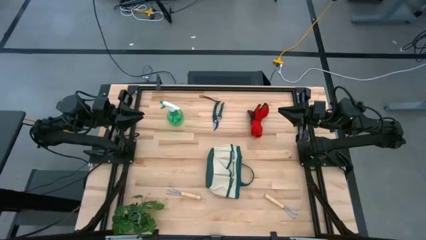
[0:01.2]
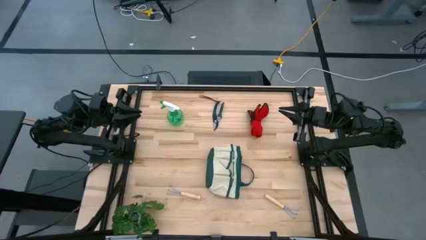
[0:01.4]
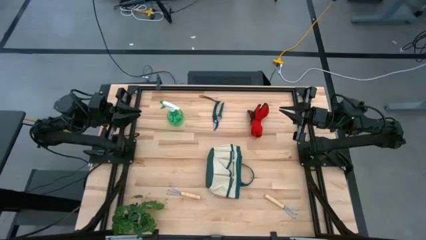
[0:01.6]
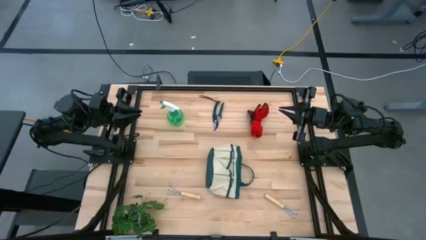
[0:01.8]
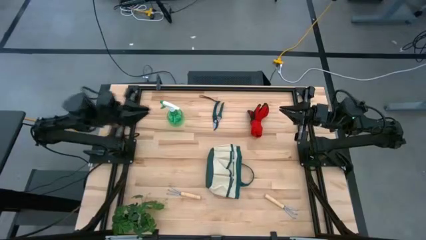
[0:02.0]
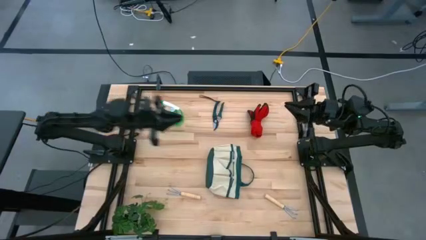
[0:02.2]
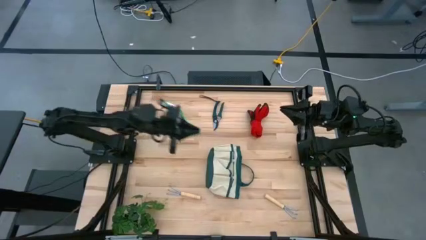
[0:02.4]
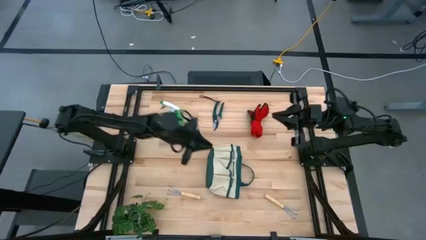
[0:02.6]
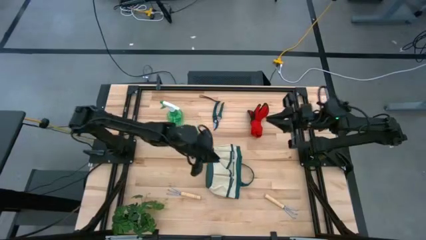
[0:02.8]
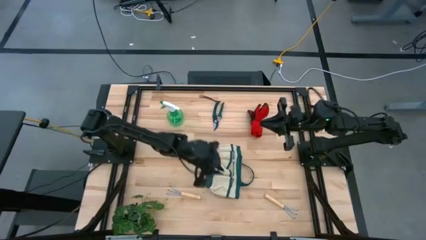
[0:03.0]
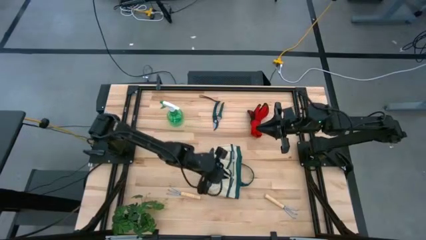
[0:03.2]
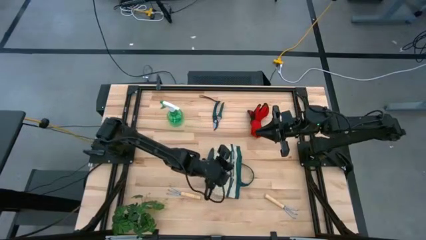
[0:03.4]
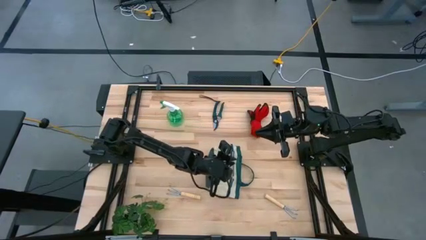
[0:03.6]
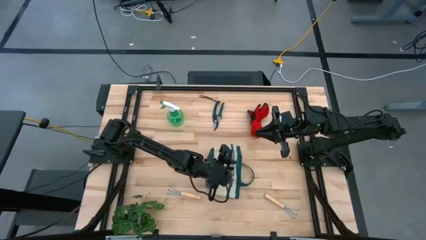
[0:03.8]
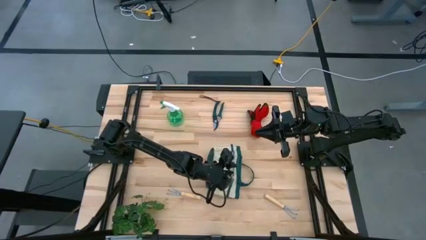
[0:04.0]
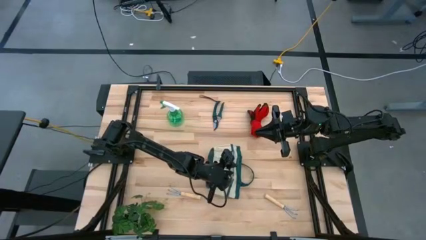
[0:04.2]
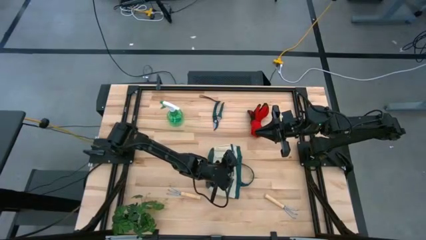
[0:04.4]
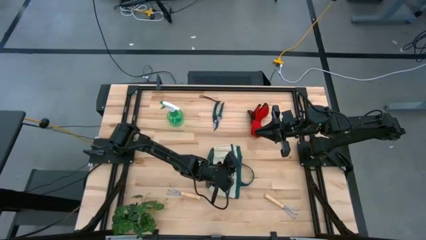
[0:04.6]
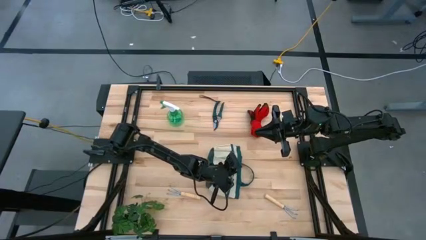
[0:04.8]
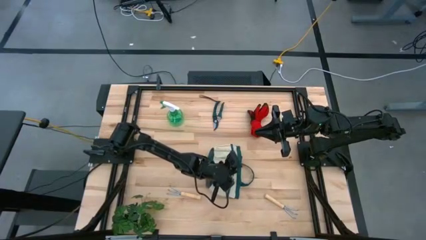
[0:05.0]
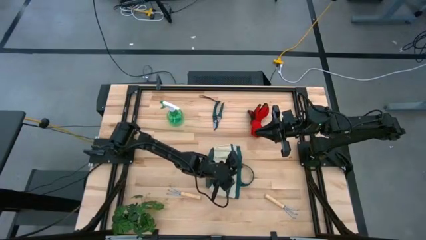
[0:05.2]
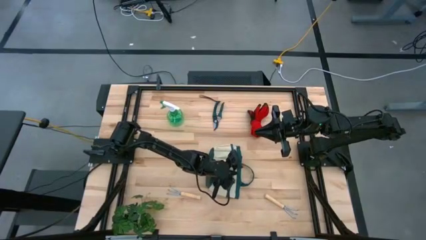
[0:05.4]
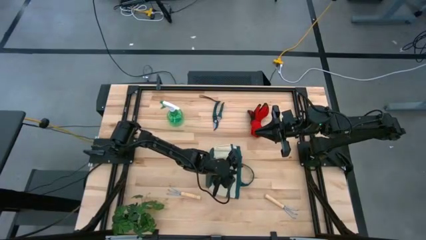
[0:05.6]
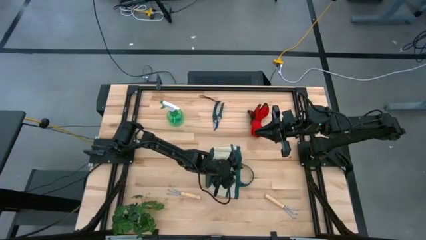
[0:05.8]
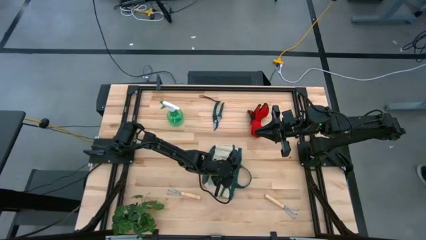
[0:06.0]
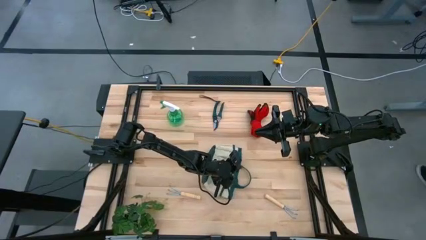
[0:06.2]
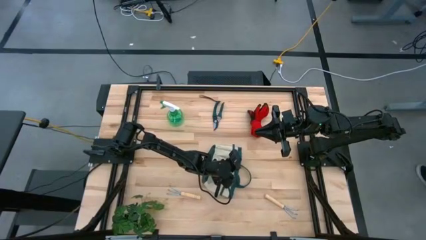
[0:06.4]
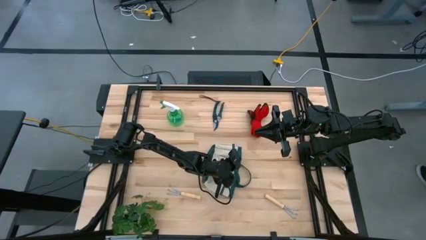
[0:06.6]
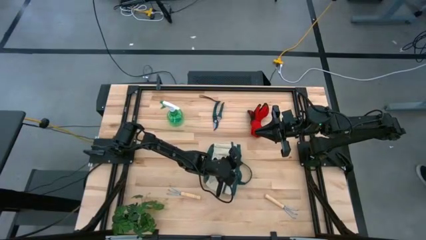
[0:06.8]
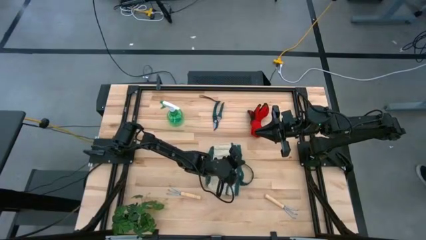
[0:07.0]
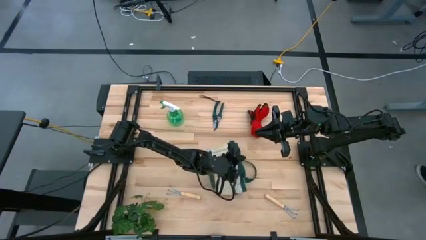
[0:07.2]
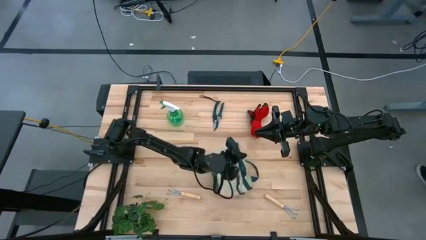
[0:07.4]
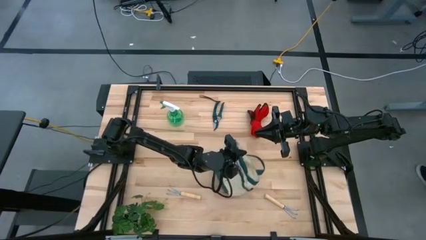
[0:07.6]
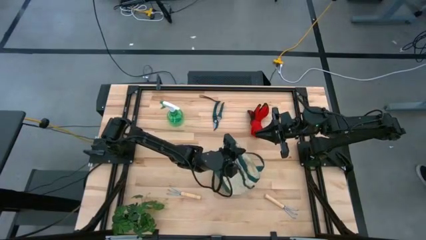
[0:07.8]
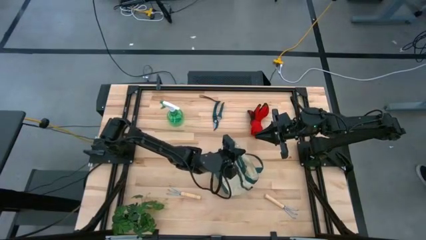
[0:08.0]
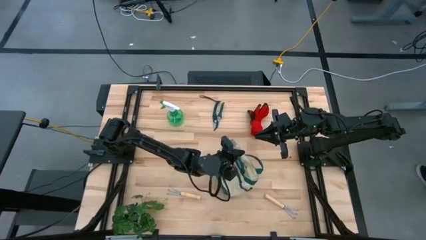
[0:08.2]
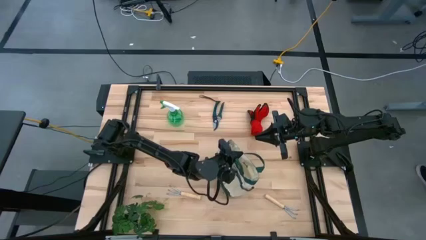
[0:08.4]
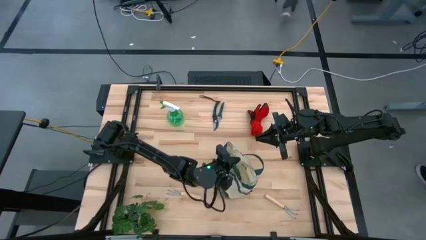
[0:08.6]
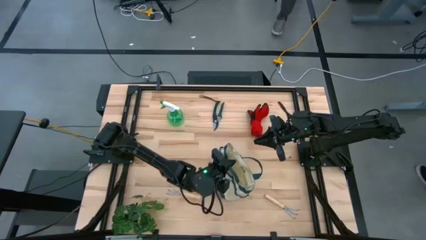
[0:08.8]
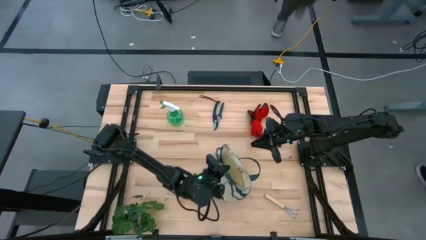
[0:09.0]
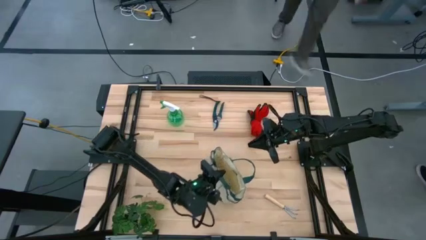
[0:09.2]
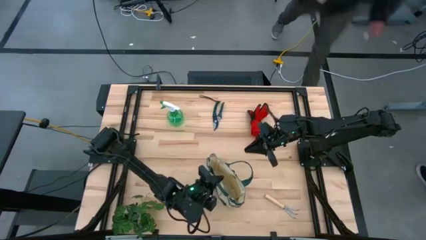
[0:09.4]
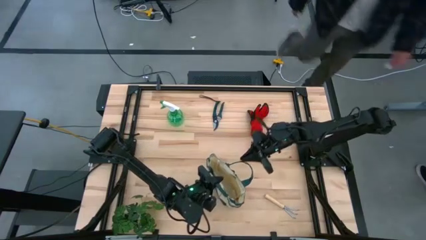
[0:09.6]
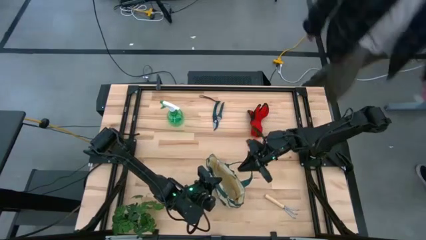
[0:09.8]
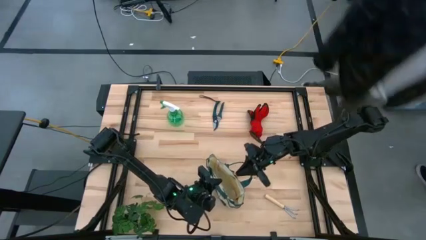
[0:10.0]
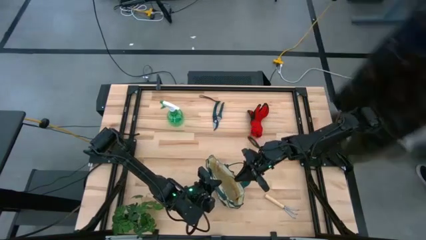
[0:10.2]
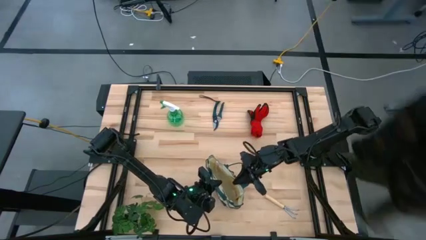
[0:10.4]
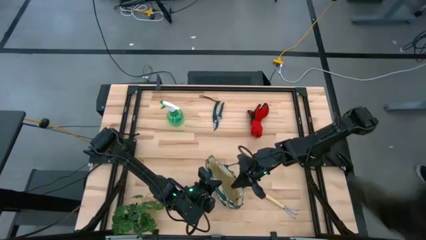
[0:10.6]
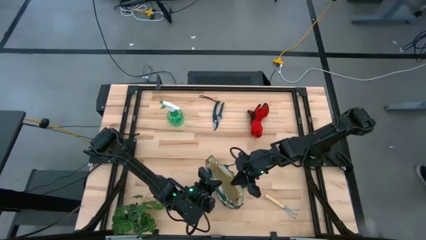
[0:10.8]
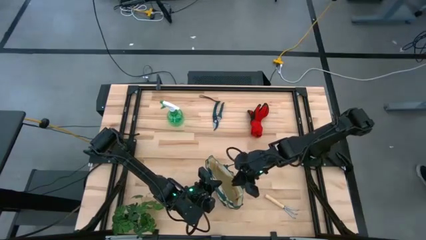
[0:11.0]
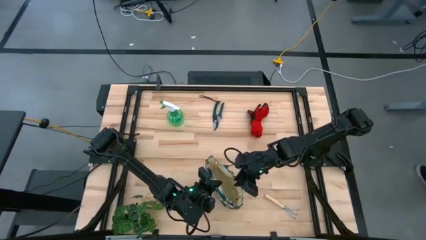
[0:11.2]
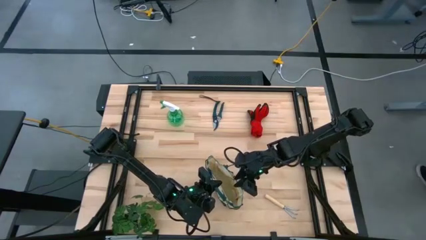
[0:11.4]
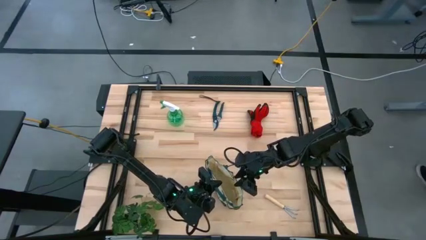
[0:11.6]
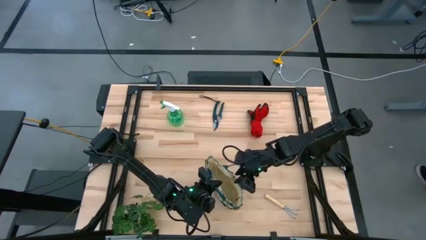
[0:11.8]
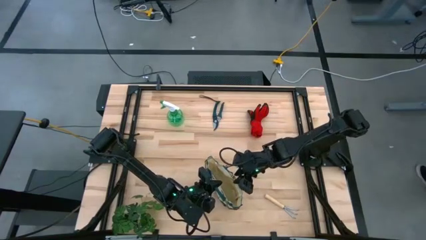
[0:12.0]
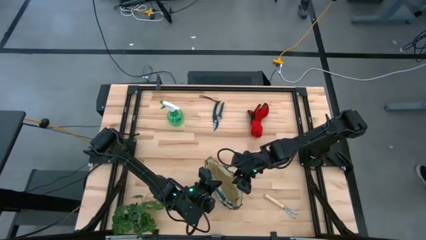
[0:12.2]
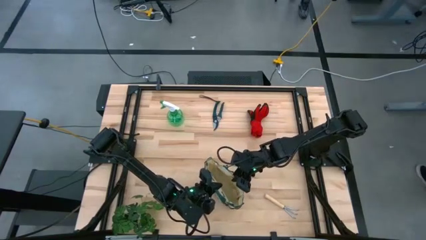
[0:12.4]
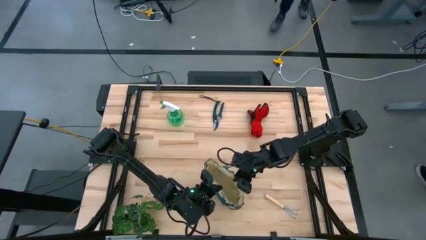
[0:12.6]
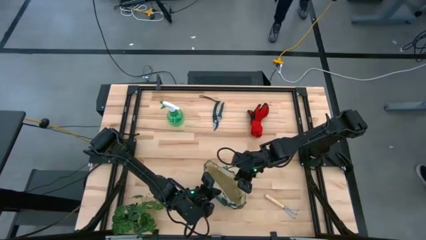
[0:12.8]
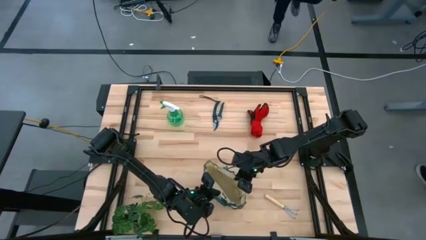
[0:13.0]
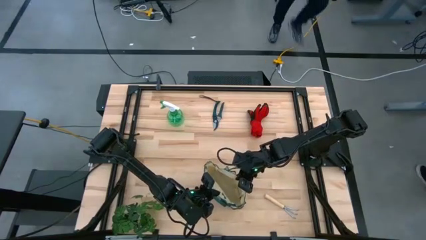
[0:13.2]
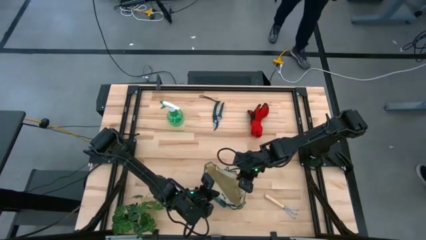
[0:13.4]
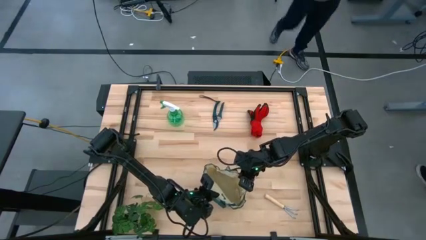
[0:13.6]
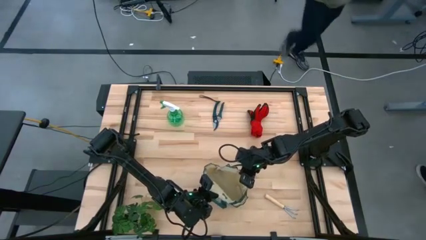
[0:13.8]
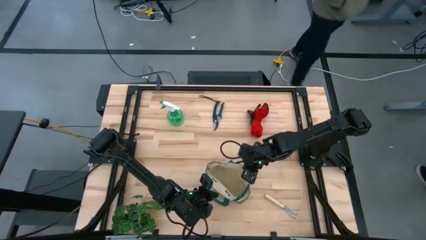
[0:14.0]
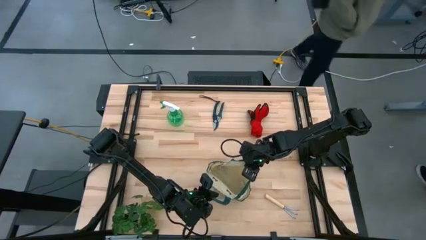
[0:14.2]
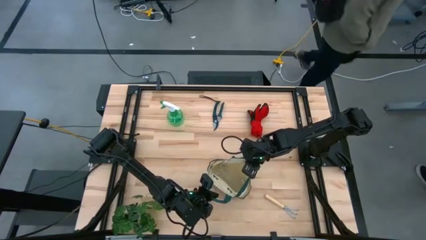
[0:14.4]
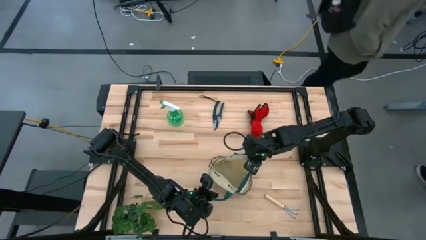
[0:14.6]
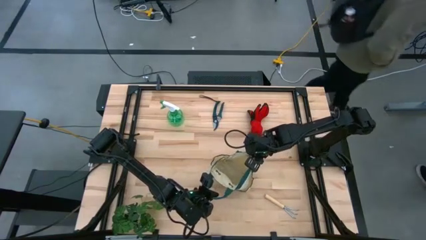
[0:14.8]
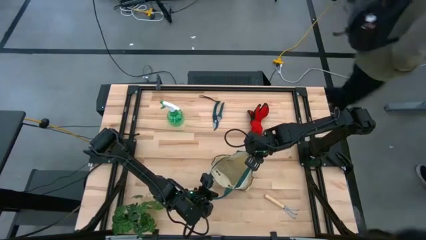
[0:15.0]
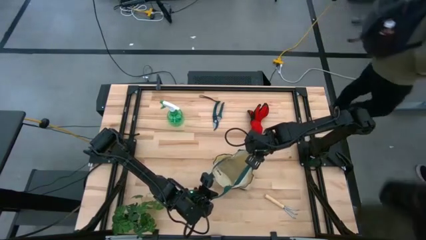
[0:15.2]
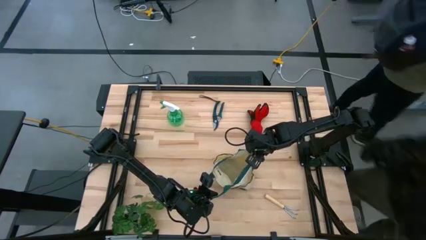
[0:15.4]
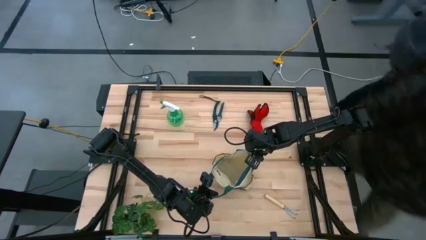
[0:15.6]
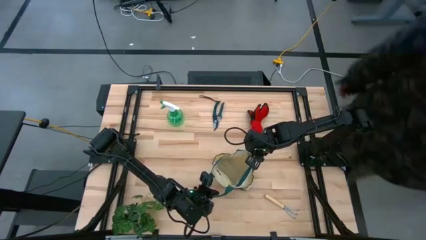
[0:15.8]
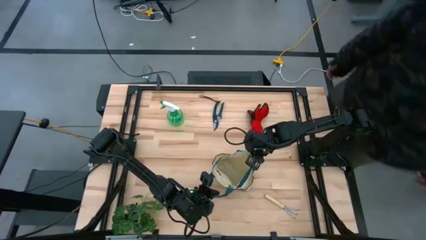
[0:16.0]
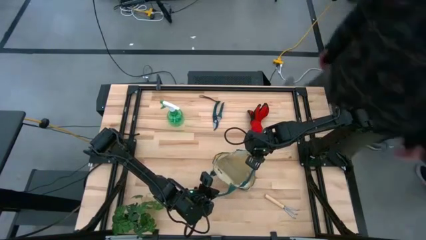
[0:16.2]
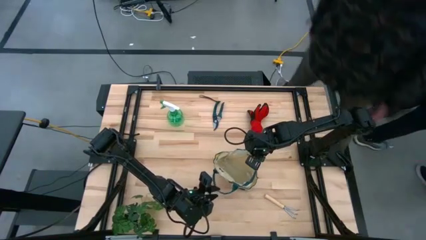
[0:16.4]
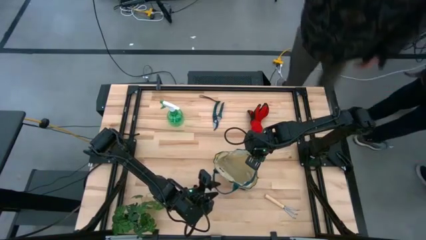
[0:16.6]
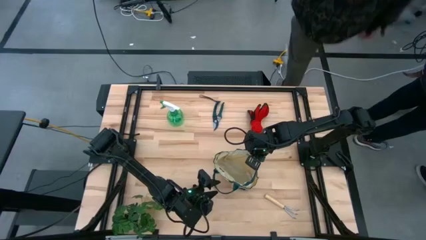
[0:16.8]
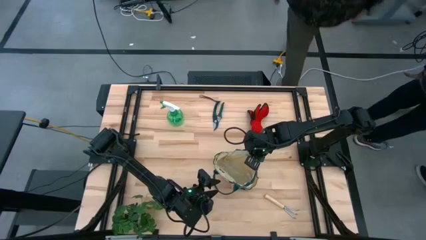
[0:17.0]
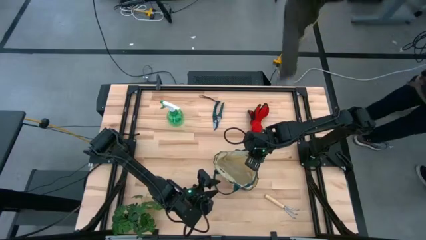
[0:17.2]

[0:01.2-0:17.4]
Task: Pick & Place Garden tools in Gardening bag
Prepare the green gardening bag
